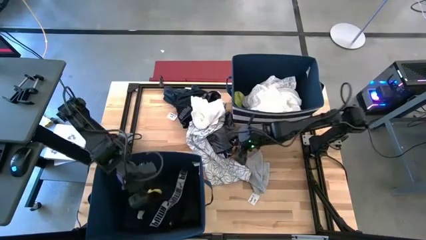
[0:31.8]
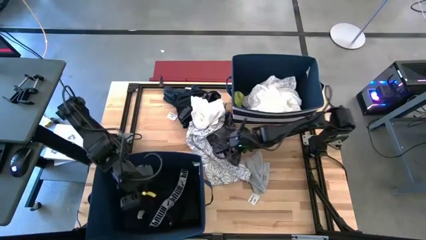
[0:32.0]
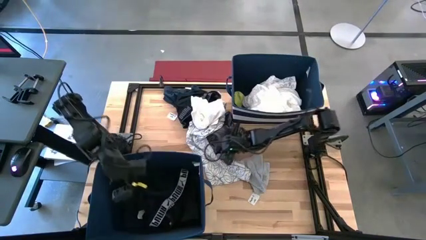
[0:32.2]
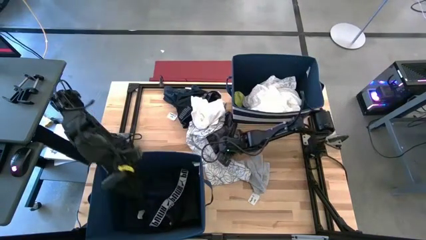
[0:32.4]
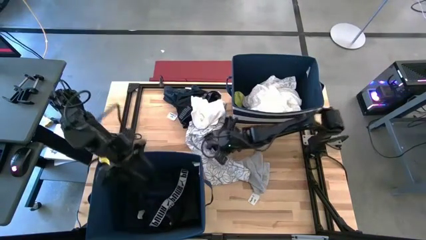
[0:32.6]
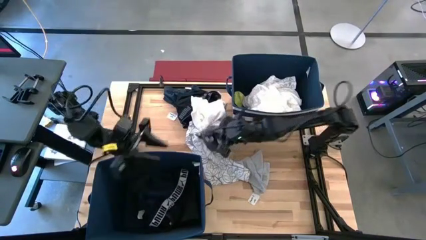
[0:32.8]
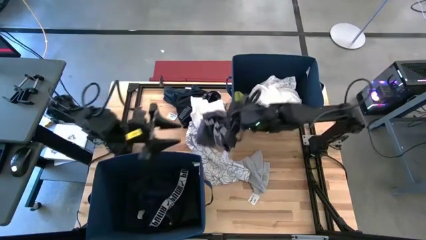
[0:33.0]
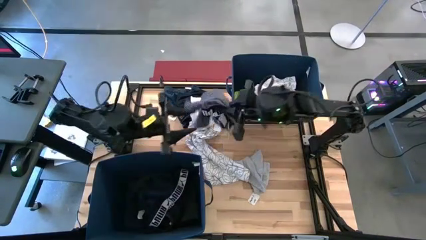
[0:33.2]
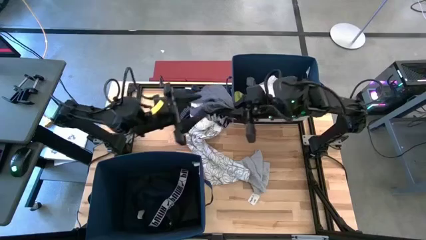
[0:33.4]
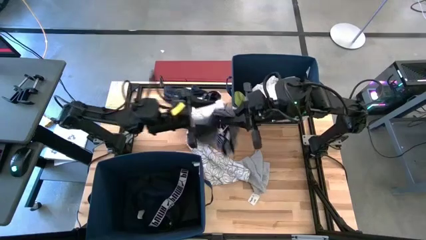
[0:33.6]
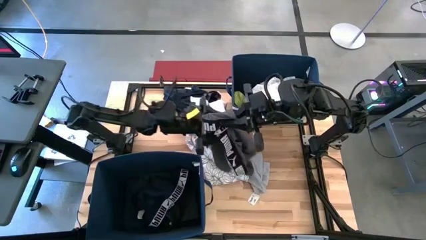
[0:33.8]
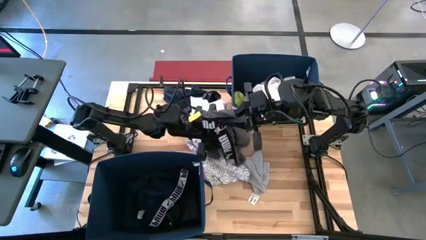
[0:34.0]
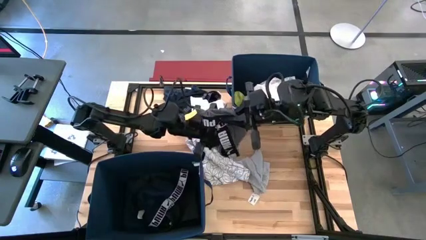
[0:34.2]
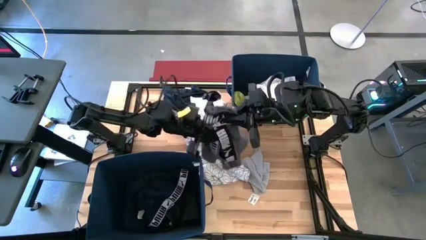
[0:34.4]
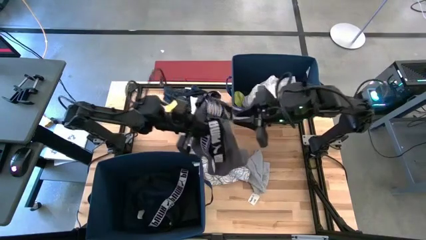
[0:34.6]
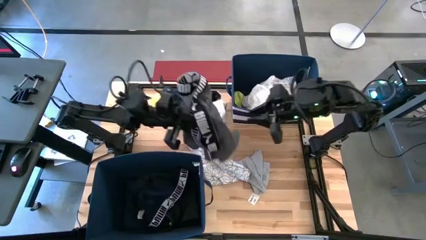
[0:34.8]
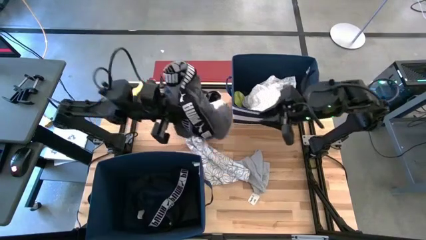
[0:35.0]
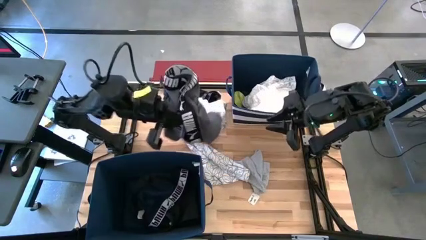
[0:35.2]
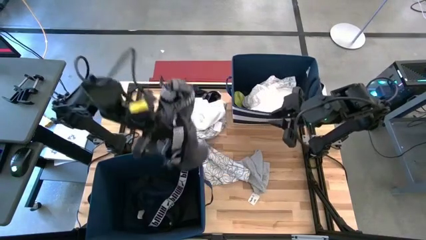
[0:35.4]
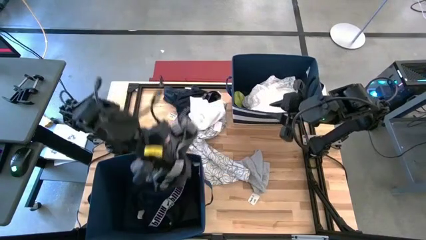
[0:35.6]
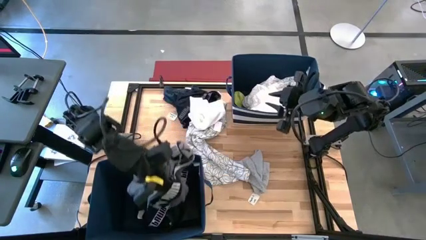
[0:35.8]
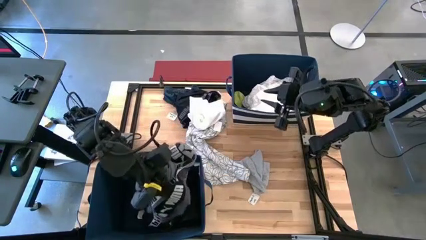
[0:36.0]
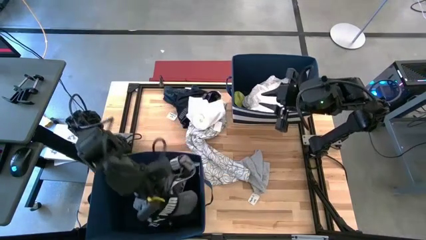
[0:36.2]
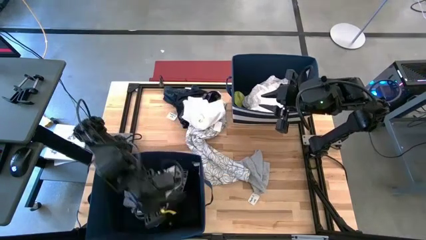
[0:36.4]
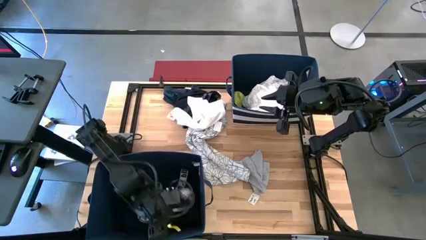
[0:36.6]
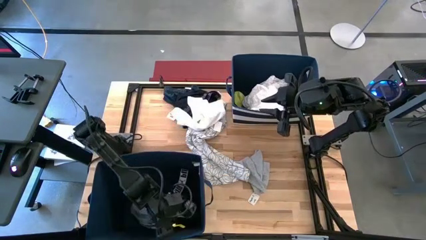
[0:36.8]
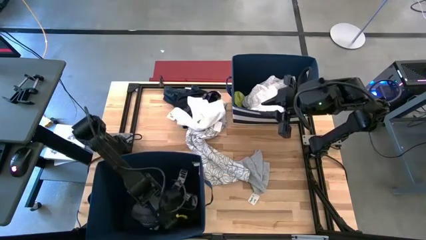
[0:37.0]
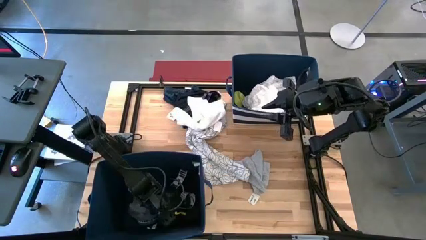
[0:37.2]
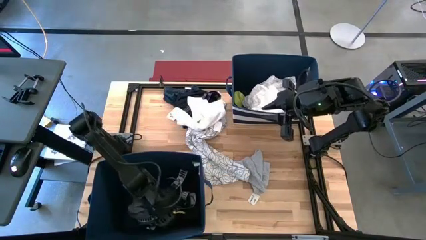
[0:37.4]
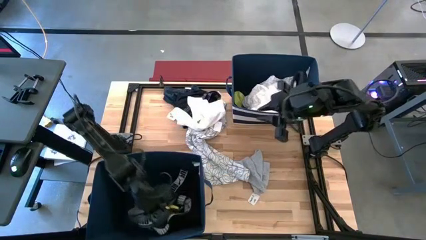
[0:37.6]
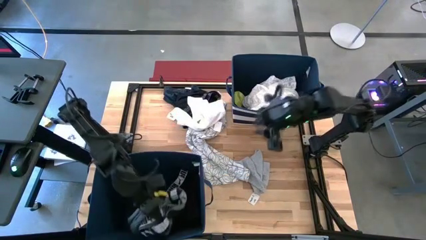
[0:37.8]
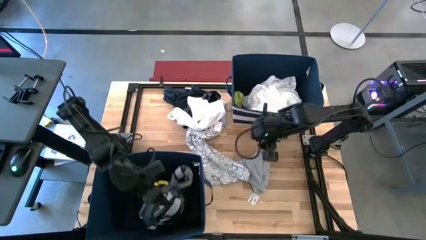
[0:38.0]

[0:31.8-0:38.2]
Task: Sort clothes
Put the gray boxer shorts into the bottom blue laundry bin

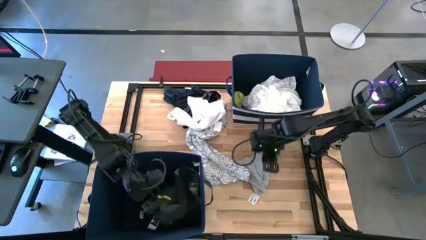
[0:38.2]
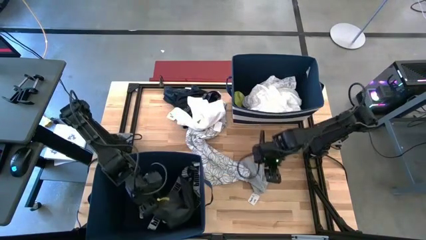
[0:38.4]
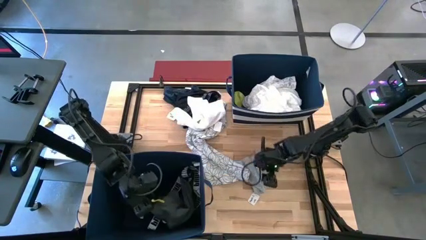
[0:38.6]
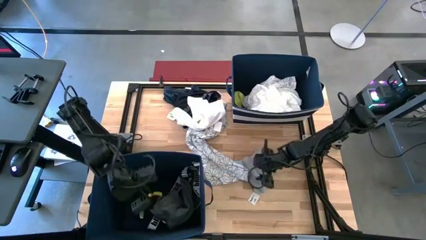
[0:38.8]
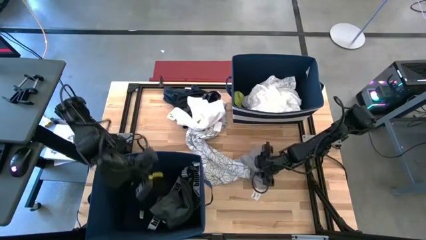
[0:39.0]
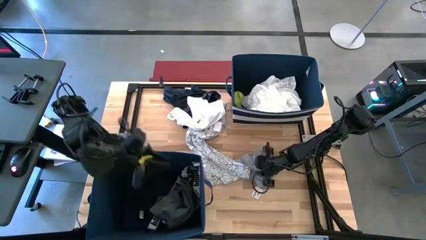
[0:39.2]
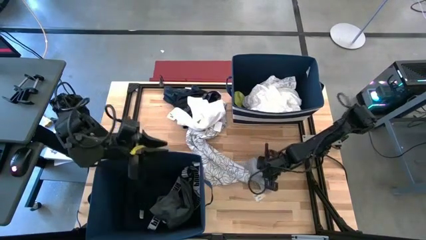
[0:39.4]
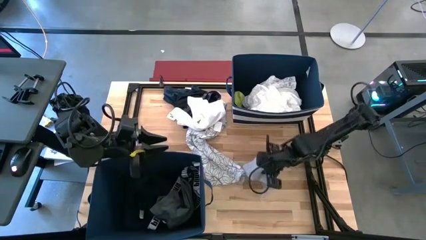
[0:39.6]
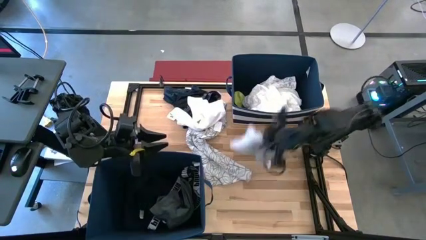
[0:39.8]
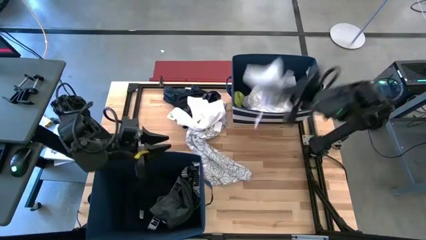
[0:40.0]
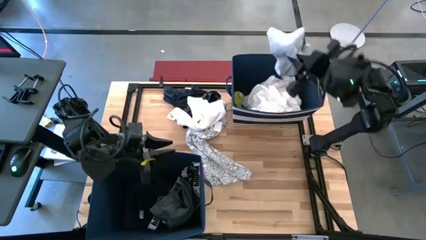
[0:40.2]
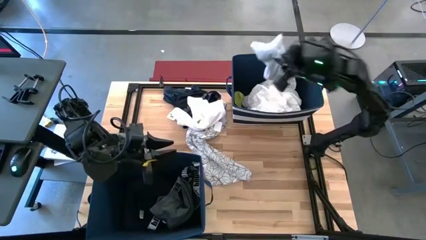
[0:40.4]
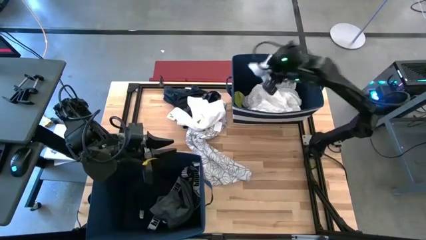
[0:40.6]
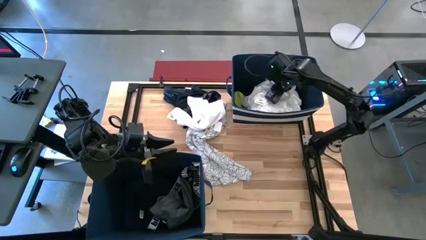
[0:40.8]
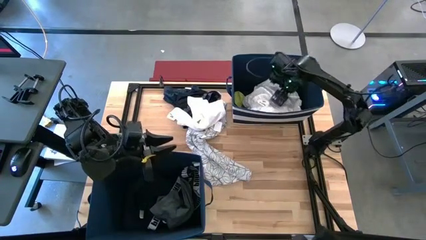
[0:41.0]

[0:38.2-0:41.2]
Put the gray underwear into the top blue laundry bin

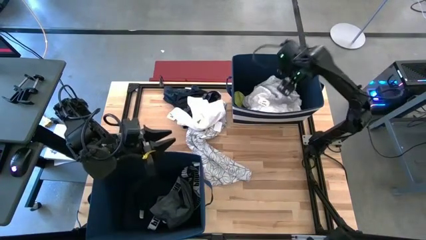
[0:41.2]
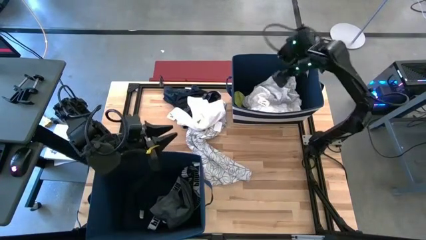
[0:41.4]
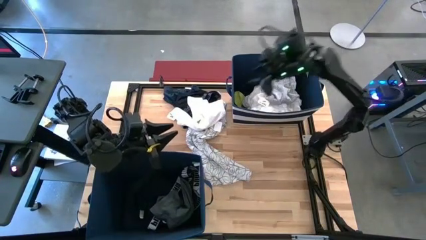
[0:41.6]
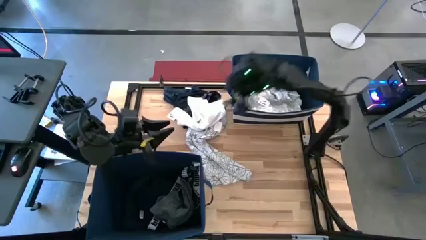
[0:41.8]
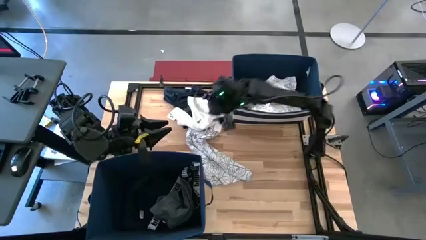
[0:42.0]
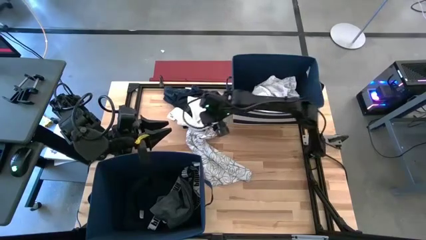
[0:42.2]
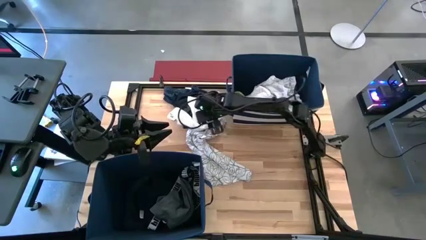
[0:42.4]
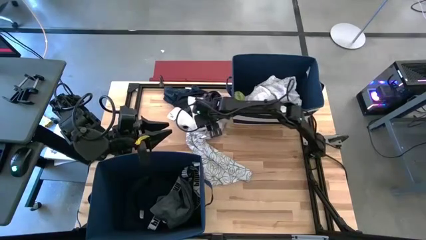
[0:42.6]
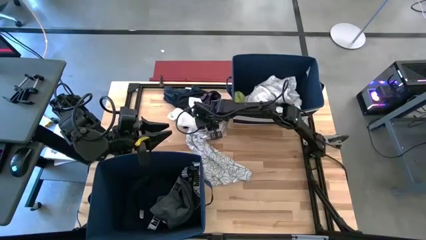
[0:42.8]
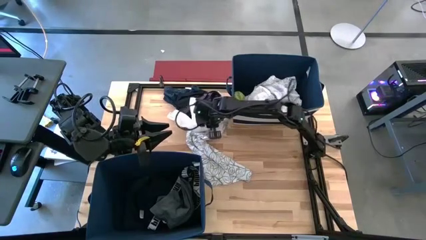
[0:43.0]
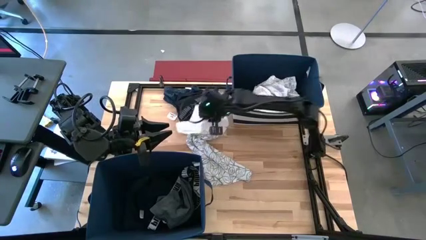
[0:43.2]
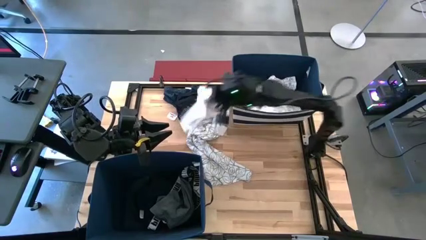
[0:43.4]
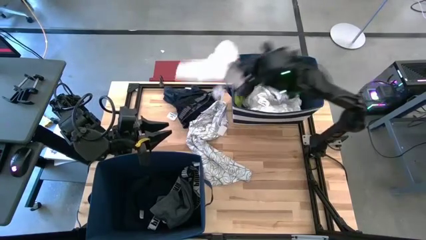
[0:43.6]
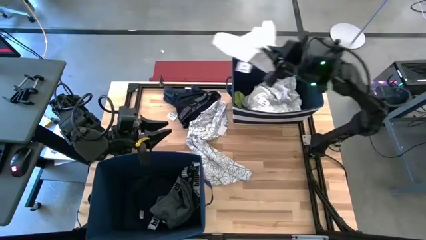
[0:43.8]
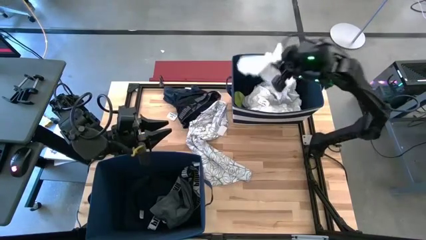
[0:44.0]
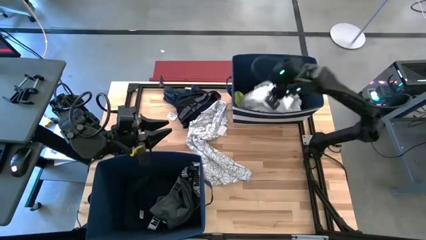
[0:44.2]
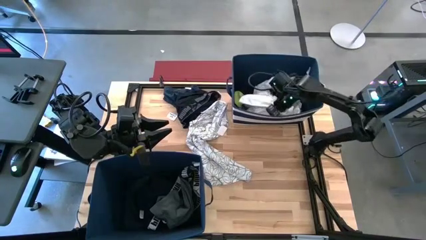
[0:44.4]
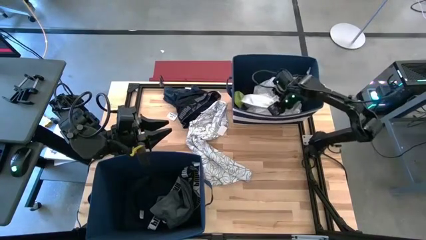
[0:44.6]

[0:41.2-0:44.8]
Put the white underwear into the top blue laundry bin

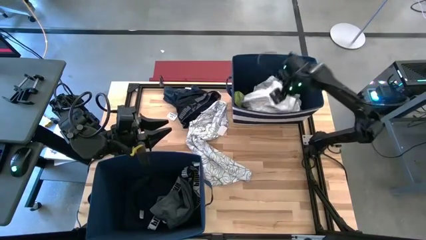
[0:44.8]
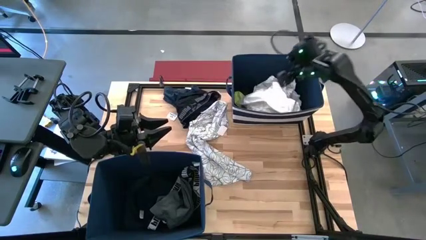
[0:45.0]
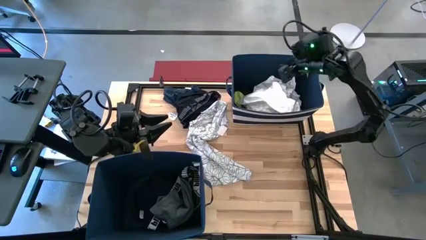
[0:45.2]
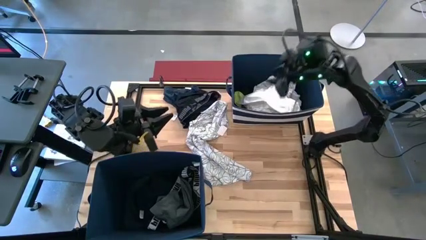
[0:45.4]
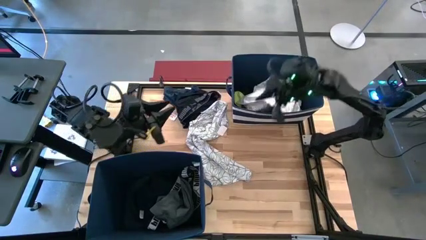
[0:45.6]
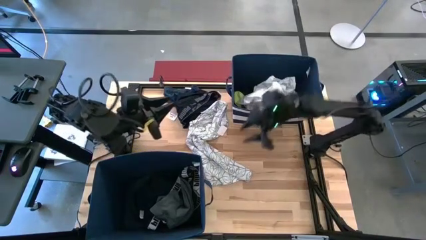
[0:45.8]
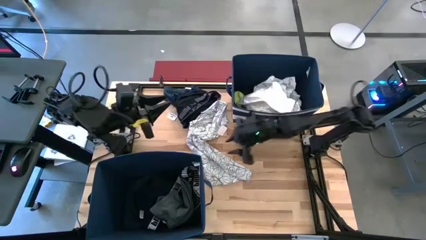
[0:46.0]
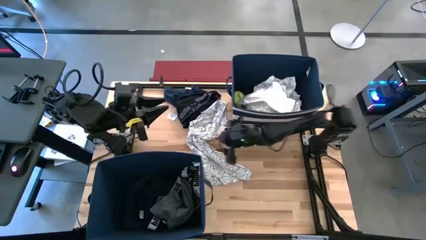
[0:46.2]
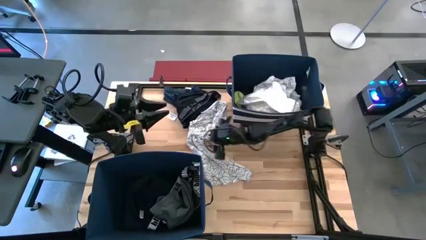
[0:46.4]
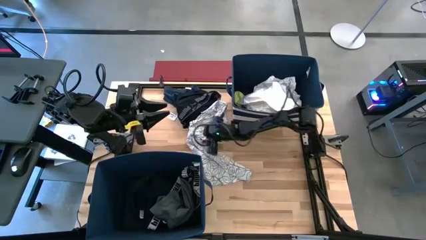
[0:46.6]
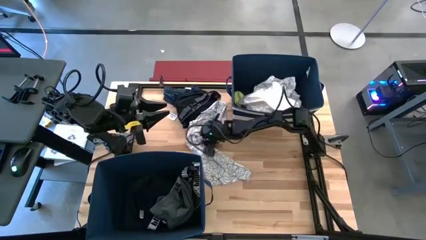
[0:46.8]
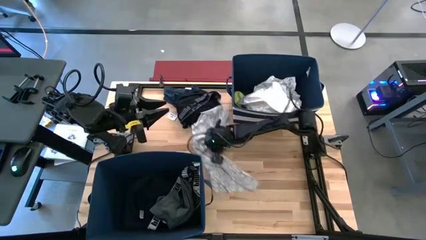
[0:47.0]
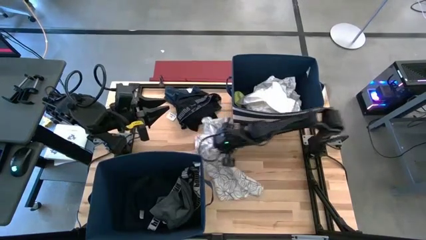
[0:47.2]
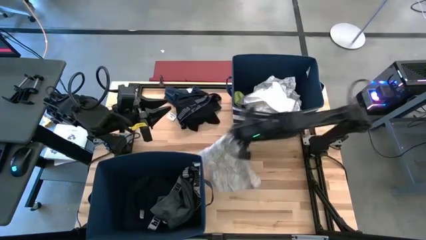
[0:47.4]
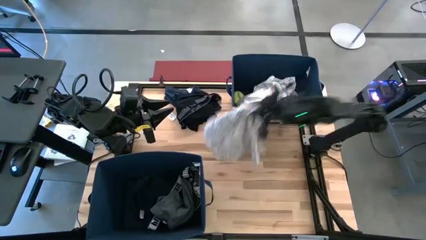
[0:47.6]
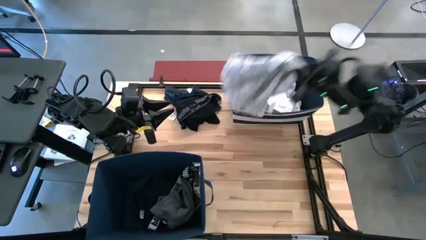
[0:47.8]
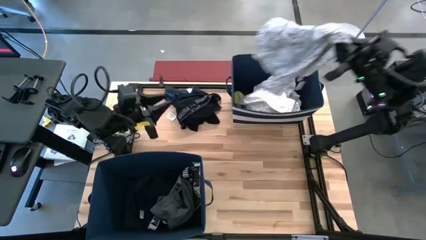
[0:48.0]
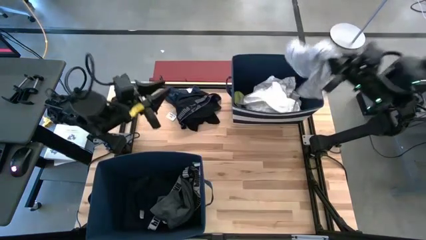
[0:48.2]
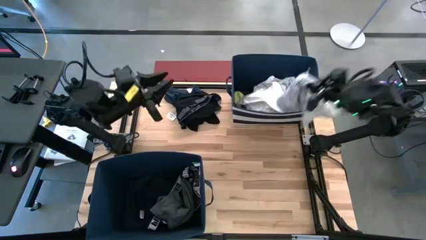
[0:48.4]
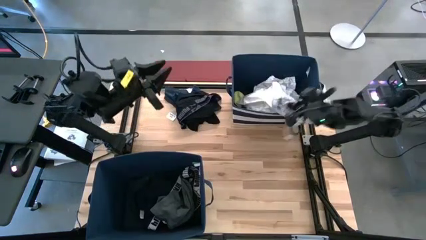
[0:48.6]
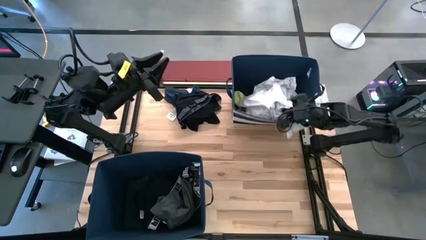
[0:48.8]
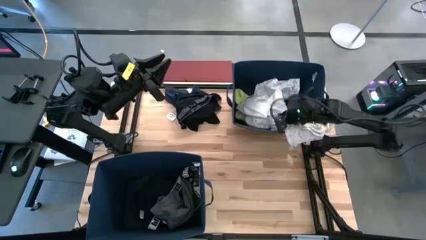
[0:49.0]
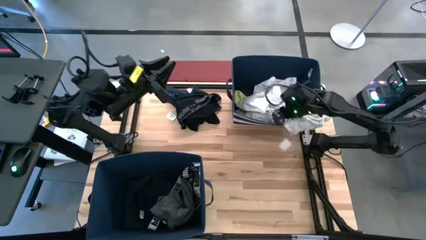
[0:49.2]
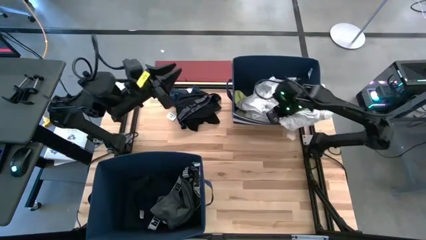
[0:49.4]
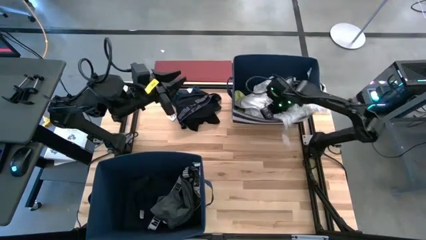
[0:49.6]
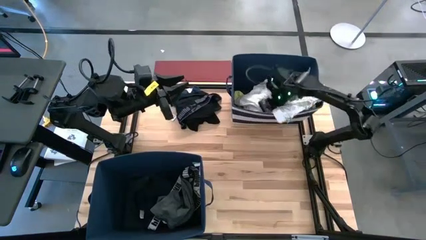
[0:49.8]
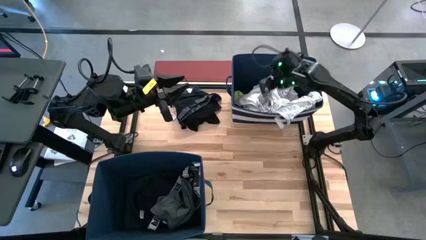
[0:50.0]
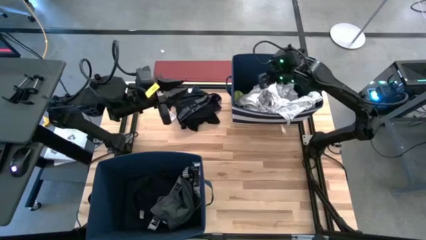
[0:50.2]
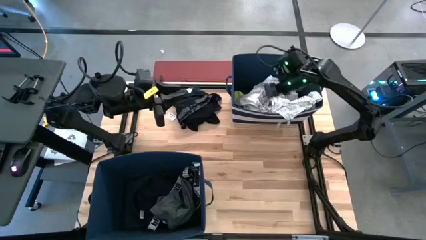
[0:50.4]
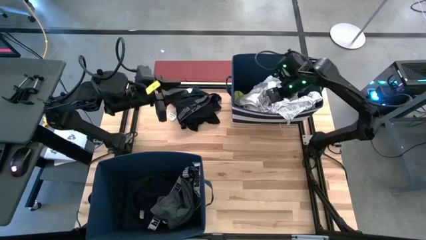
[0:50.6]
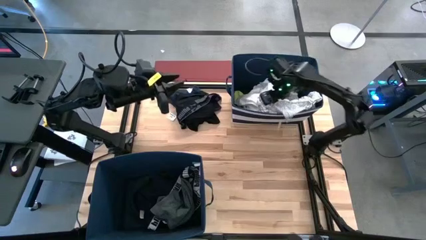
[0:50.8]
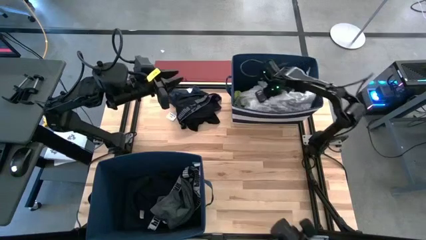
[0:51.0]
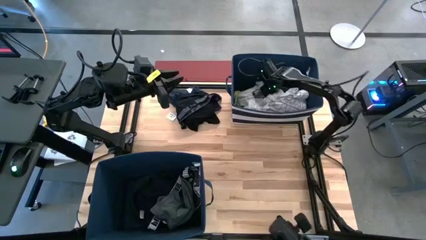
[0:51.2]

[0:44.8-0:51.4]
Put the white patterned shirt into the top blue laundry bin
